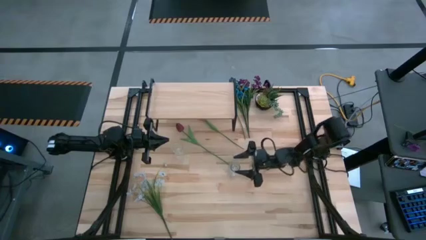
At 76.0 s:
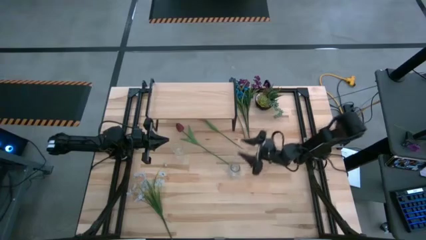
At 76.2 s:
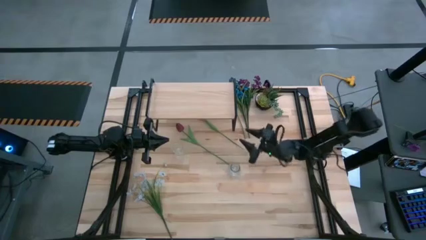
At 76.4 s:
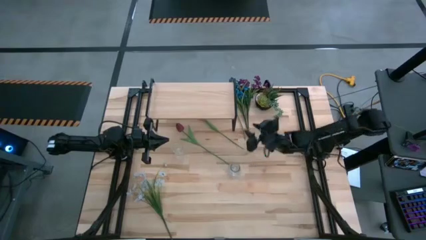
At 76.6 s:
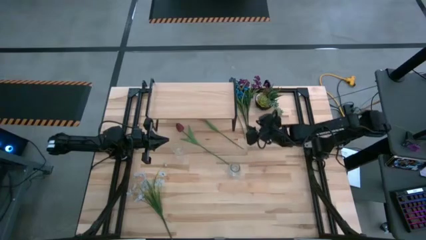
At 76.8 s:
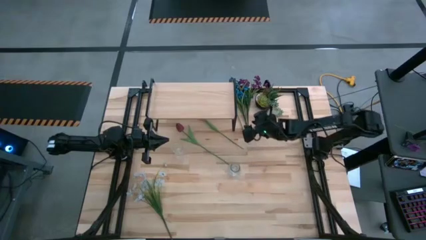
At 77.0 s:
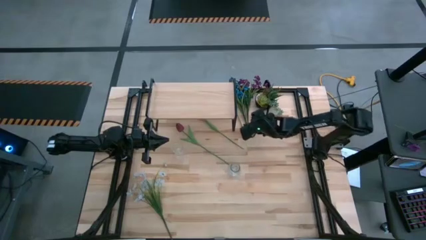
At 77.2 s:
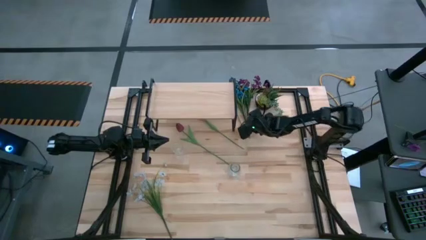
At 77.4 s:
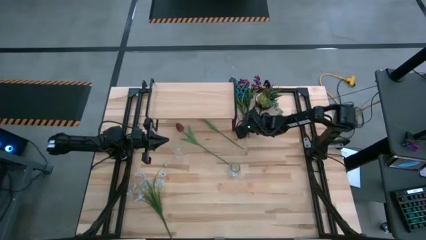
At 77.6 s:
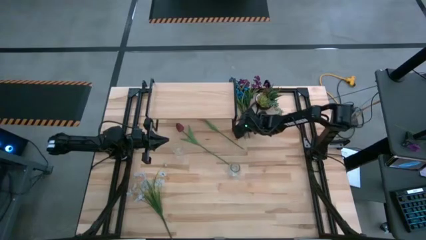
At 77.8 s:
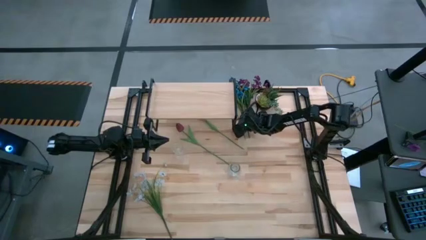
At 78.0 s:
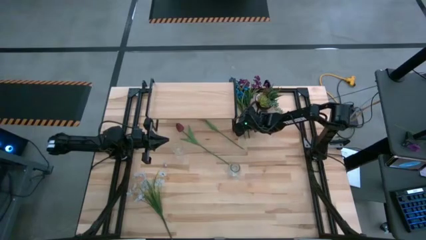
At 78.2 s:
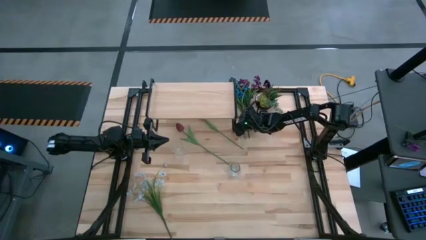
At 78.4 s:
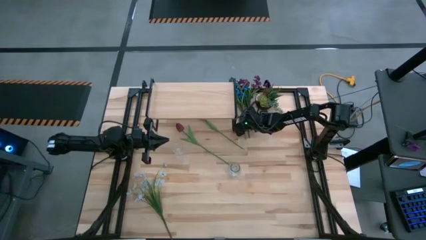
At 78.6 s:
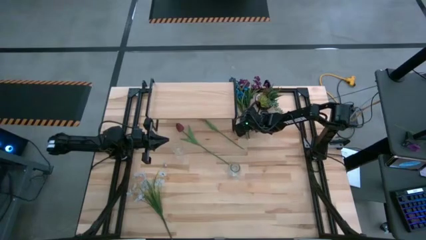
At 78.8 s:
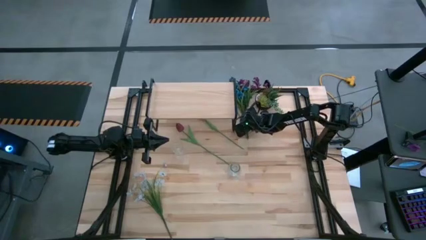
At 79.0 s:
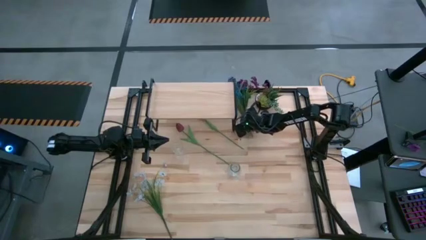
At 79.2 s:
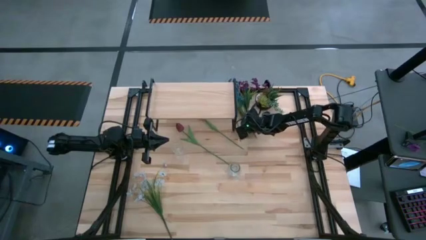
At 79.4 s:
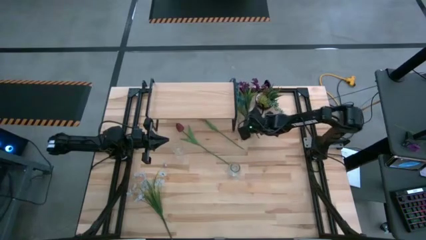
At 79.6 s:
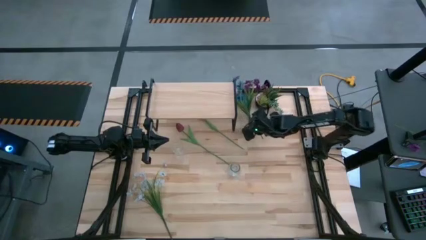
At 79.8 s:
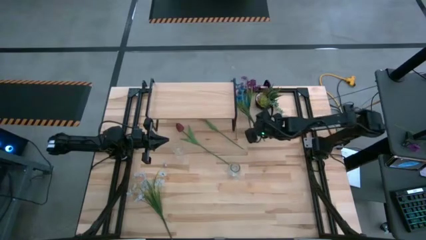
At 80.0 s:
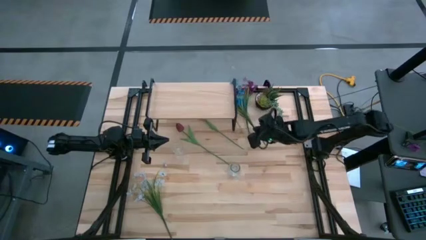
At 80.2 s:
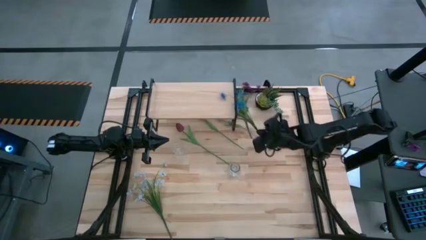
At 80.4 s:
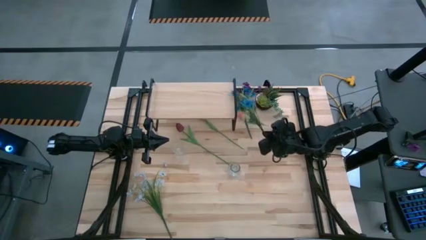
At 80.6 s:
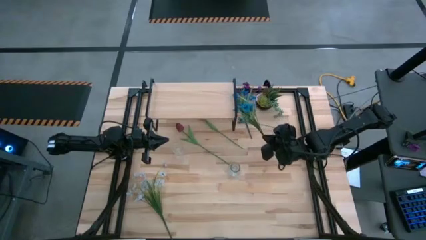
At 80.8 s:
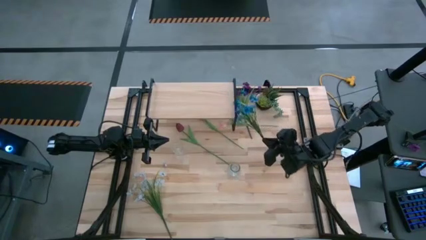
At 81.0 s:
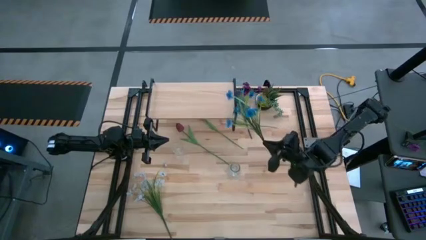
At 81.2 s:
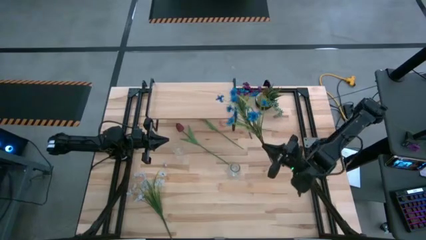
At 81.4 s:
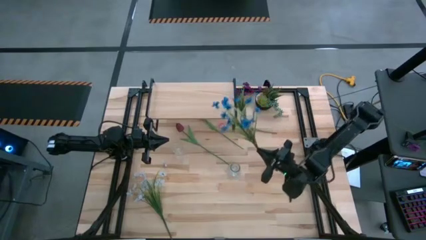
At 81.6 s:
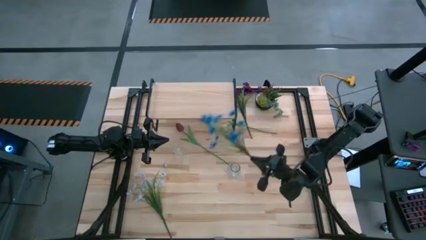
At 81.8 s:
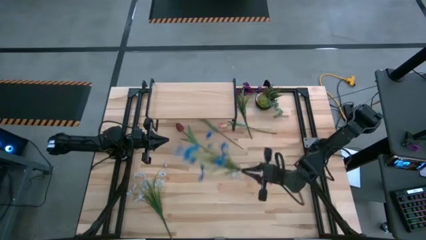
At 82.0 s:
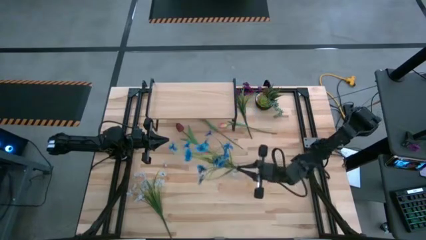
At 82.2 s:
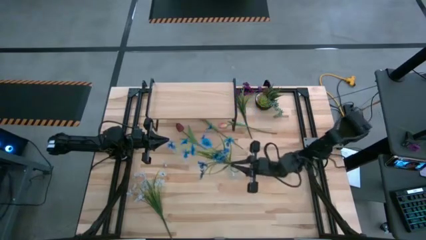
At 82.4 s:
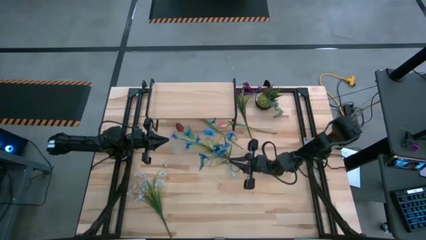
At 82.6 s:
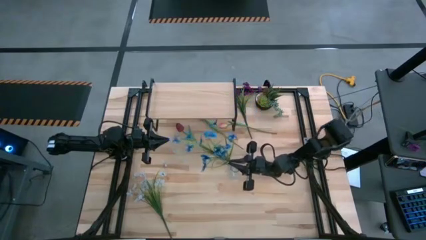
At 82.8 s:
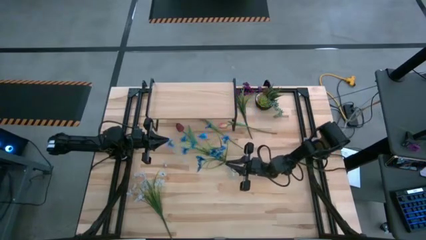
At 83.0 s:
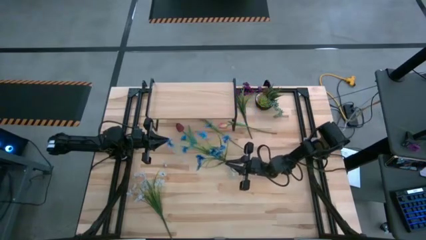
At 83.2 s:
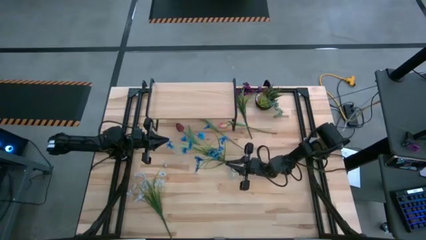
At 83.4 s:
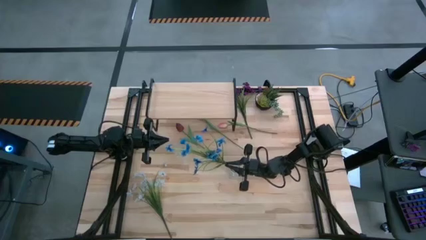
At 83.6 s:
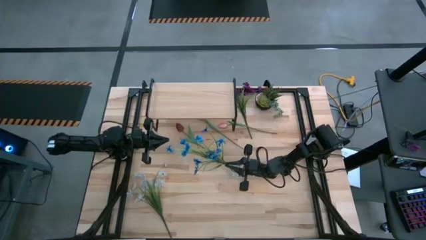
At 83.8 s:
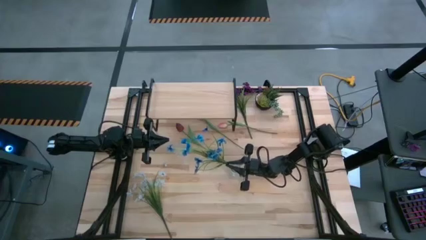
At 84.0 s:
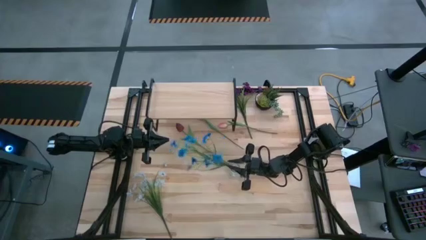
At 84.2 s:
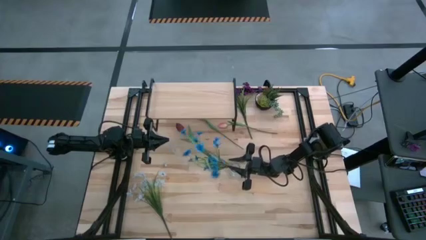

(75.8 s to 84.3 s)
Task: Pick and place flowers into a vace then onto a shelf
Put the blue flowers into the right transparent vase

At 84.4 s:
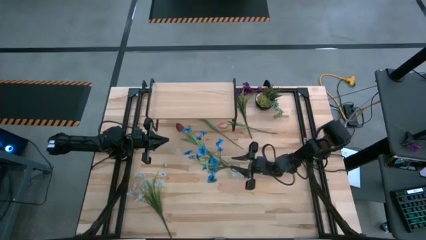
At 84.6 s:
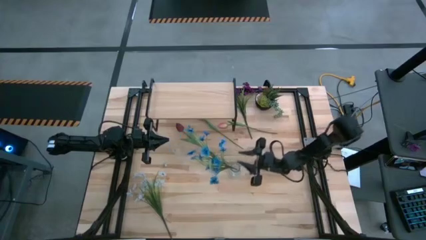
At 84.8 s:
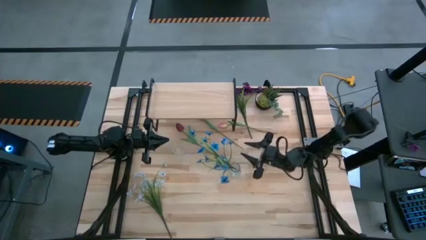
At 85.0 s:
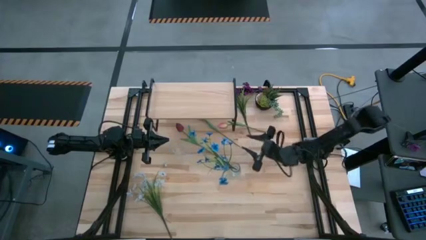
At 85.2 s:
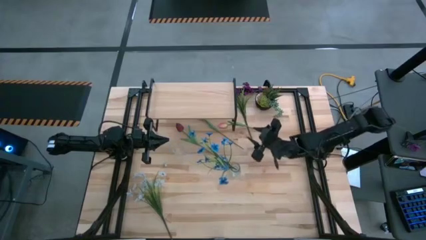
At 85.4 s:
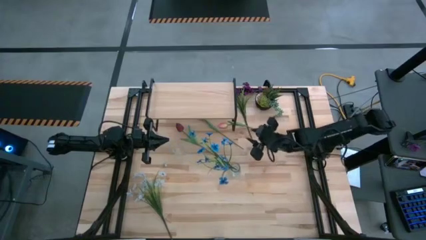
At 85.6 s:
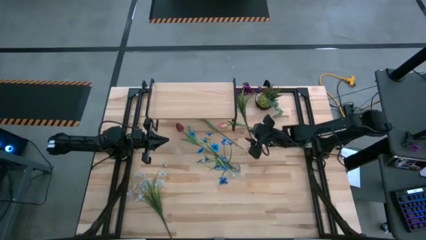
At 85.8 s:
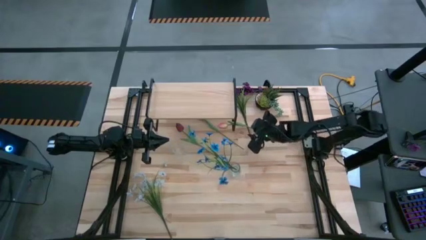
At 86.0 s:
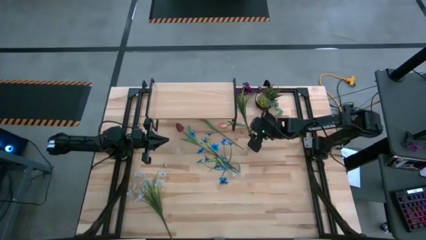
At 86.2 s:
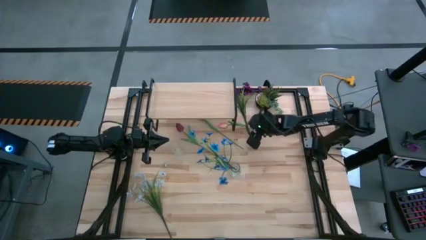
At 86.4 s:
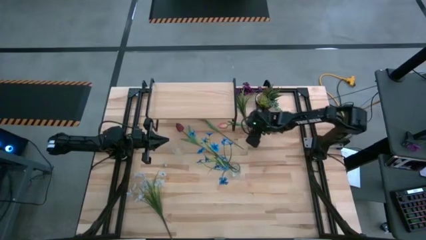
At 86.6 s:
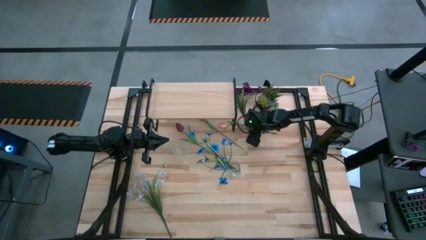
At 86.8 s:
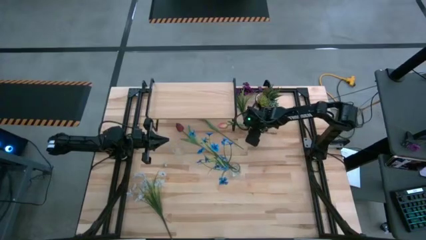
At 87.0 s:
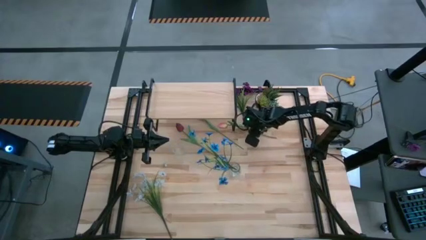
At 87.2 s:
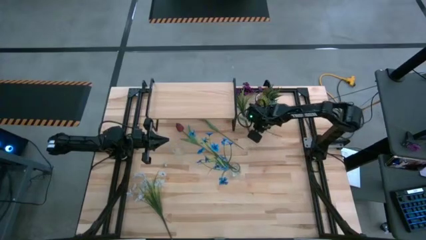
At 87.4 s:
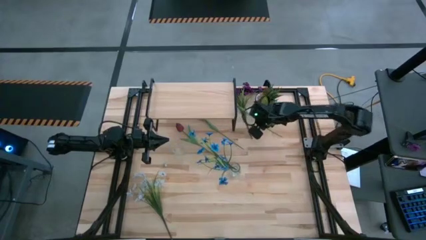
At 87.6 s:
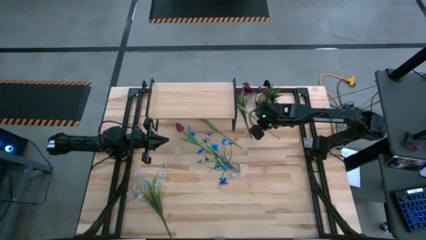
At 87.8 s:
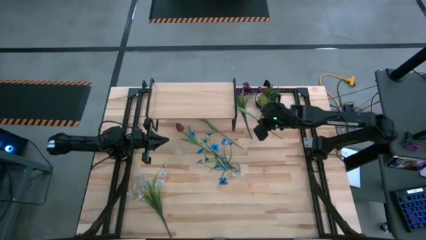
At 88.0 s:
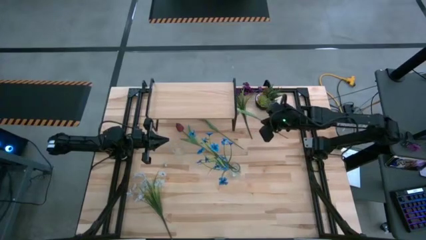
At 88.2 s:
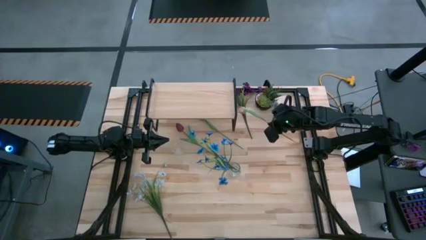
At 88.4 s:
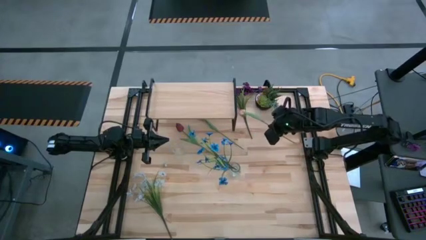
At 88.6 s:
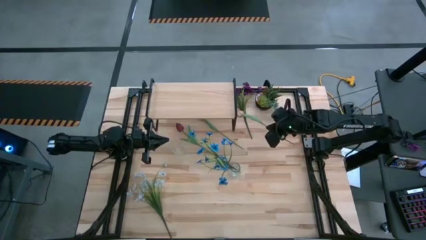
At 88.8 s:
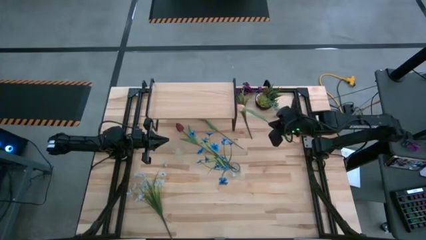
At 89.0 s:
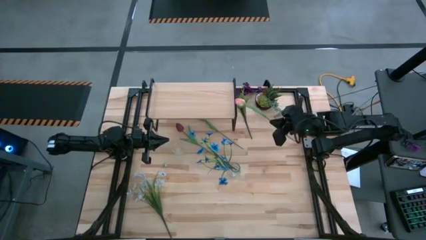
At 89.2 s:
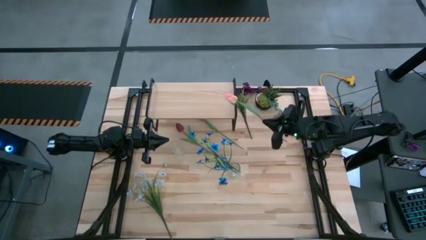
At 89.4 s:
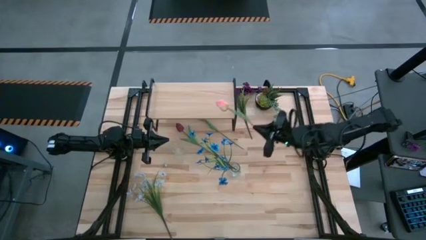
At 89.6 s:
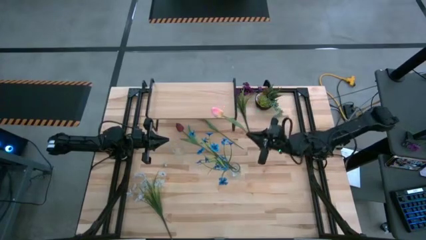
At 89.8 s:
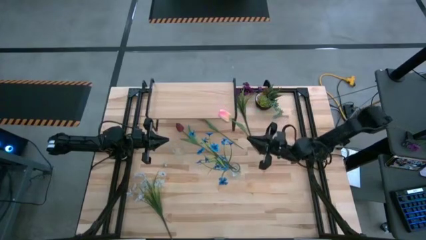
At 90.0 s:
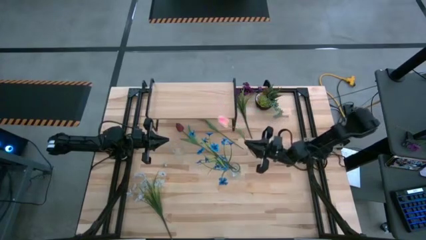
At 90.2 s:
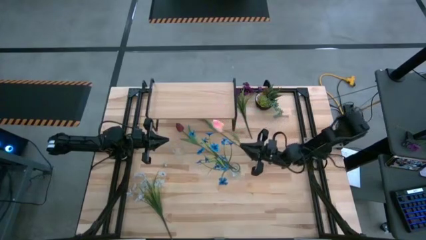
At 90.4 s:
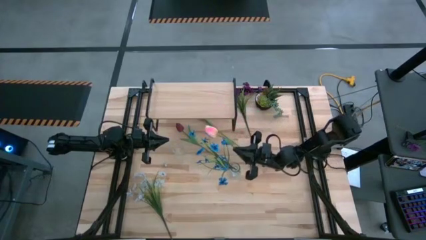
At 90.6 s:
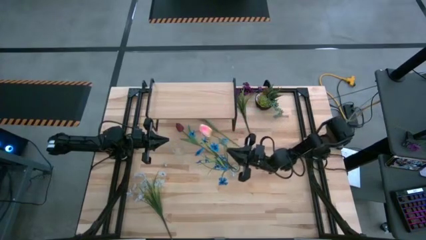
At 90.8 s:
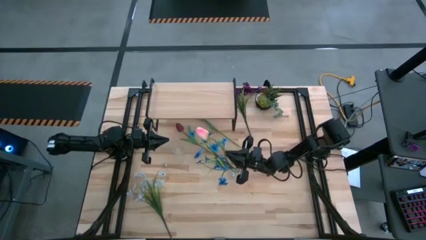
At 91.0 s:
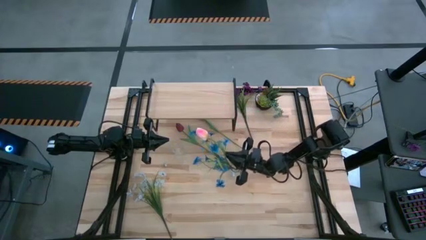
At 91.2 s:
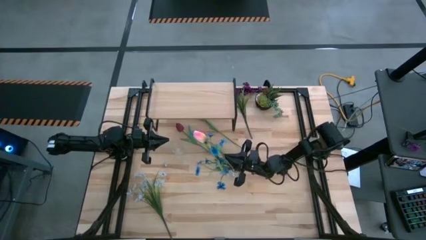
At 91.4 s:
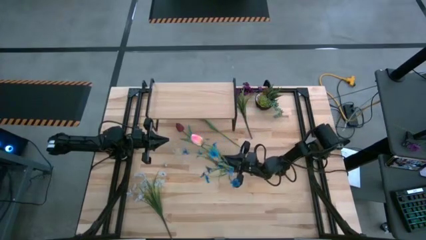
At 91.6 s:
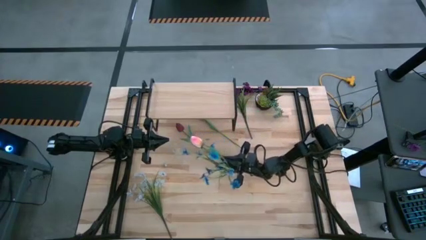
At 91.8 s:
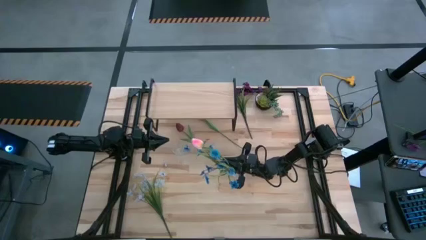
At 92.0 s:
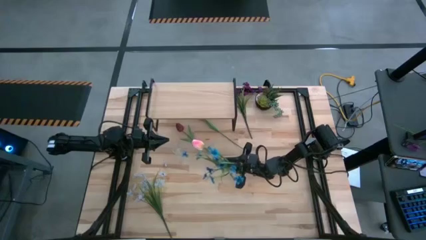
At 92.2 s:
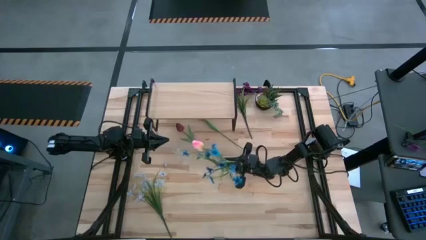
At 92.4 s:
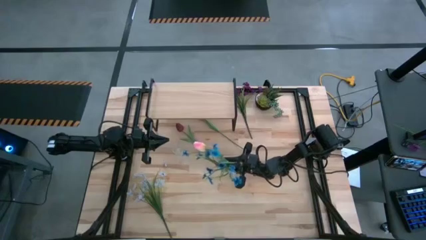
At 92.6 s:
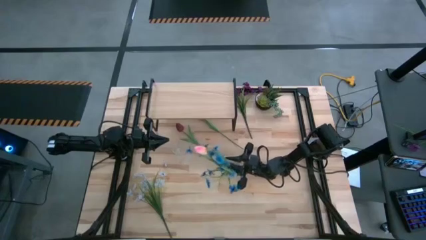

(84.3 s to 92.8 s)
Put the pink flower into the right transparent vase
